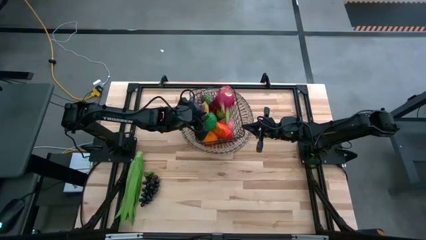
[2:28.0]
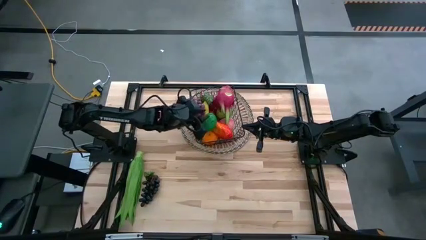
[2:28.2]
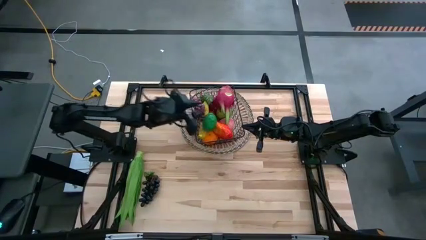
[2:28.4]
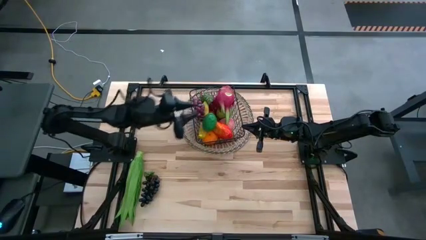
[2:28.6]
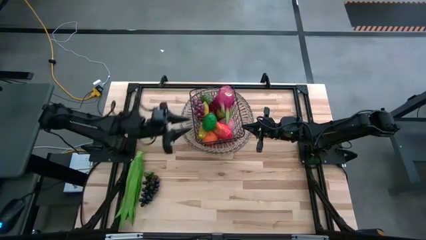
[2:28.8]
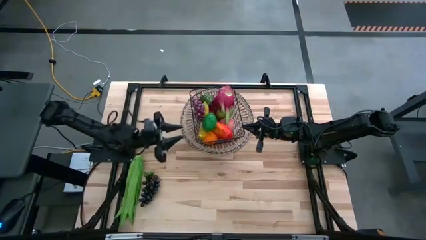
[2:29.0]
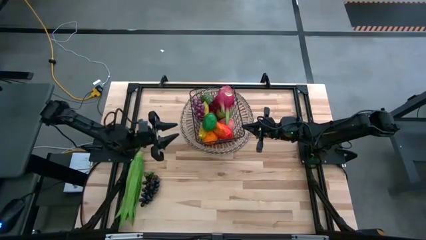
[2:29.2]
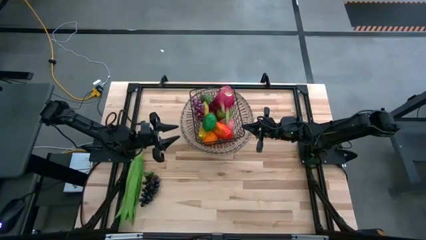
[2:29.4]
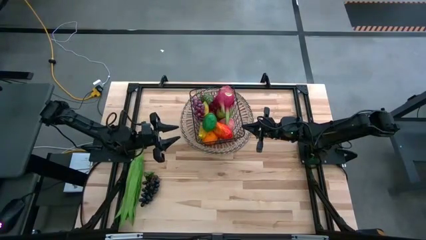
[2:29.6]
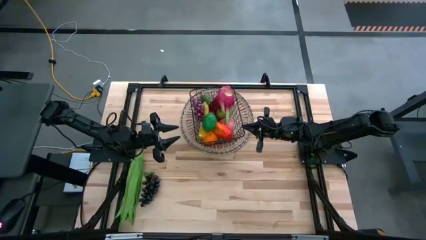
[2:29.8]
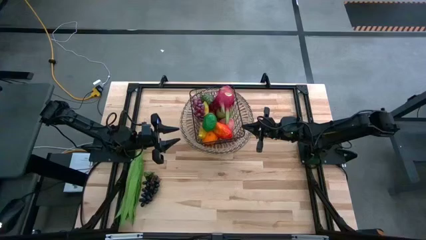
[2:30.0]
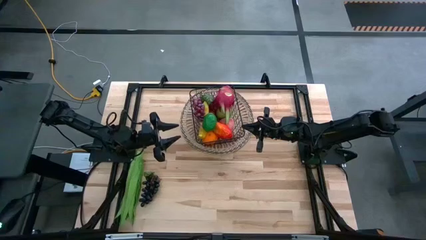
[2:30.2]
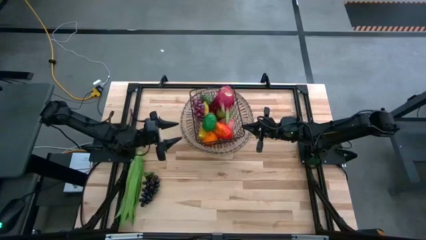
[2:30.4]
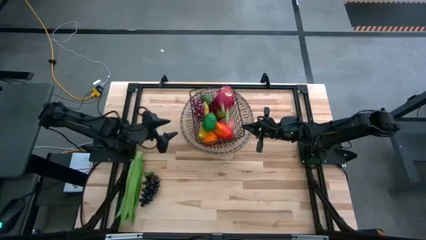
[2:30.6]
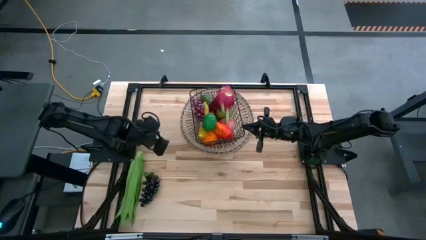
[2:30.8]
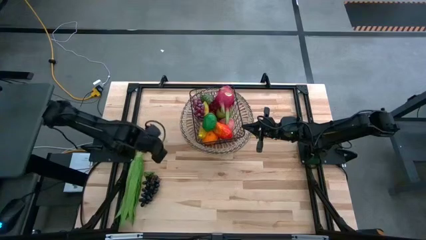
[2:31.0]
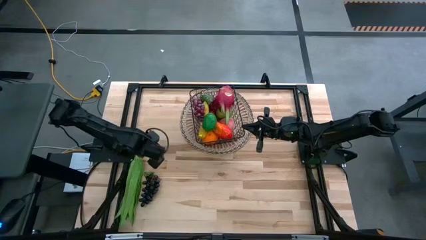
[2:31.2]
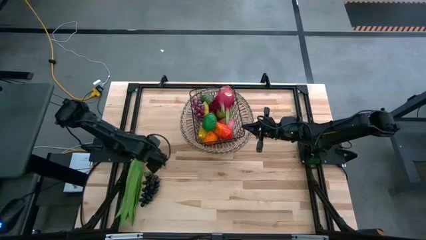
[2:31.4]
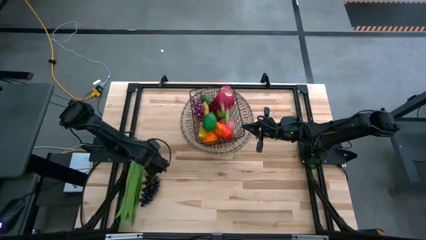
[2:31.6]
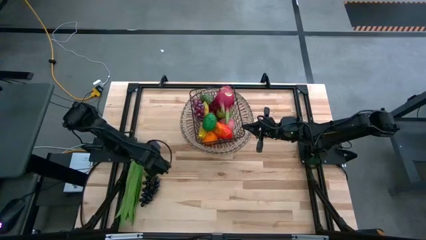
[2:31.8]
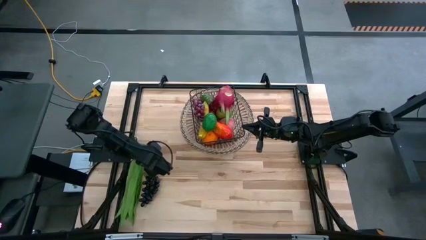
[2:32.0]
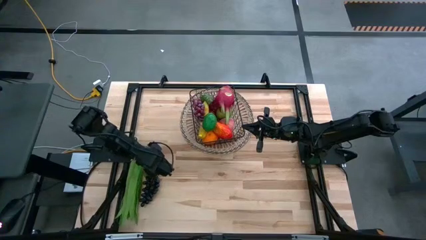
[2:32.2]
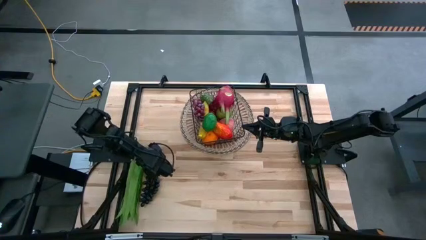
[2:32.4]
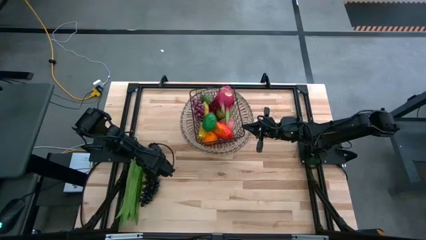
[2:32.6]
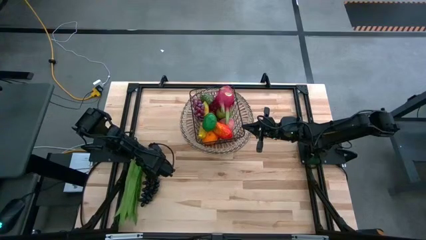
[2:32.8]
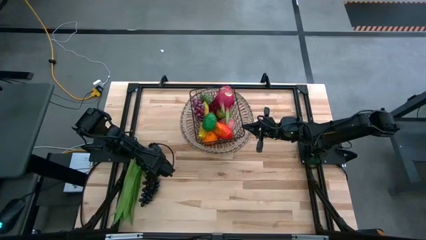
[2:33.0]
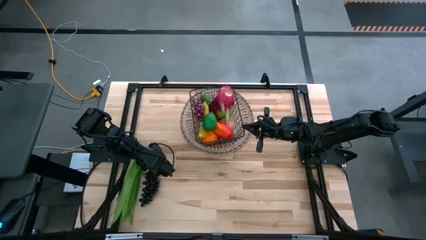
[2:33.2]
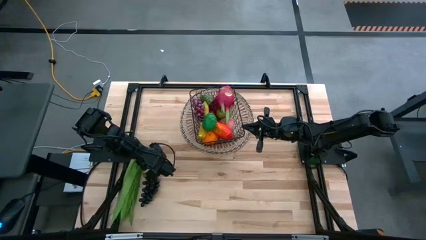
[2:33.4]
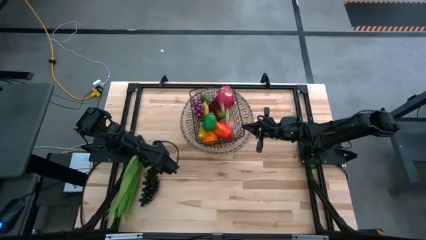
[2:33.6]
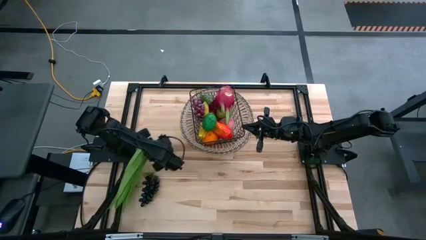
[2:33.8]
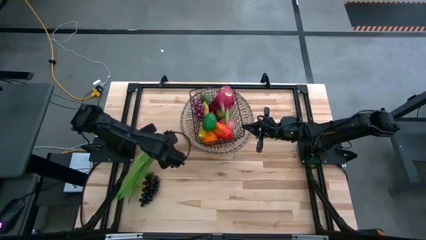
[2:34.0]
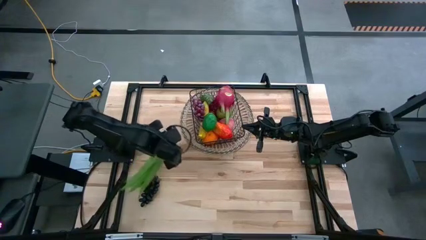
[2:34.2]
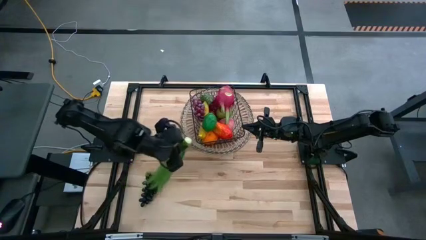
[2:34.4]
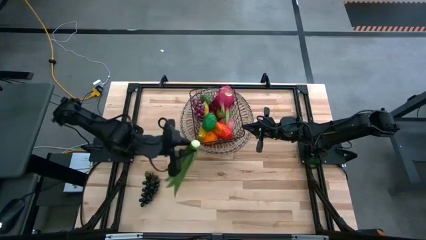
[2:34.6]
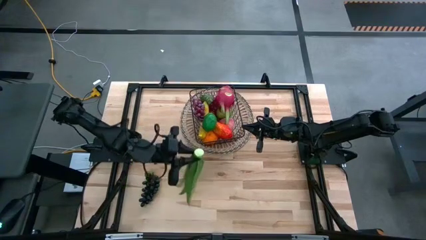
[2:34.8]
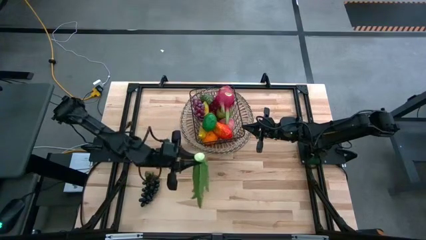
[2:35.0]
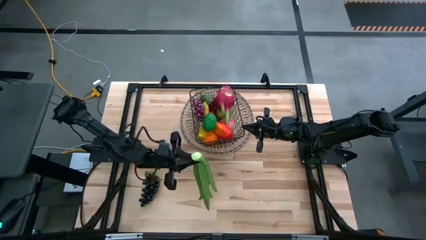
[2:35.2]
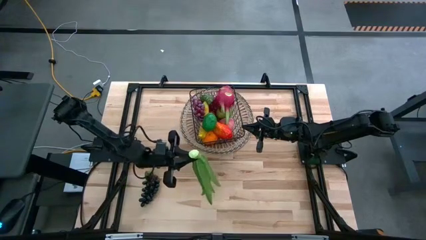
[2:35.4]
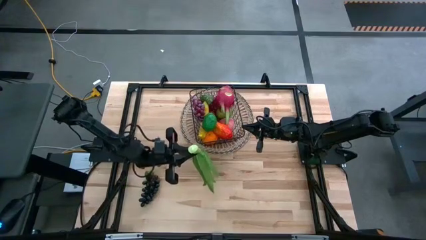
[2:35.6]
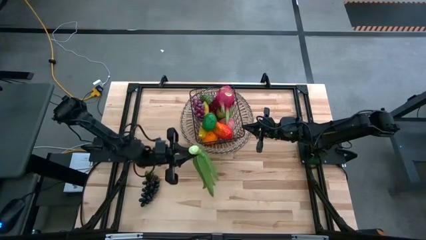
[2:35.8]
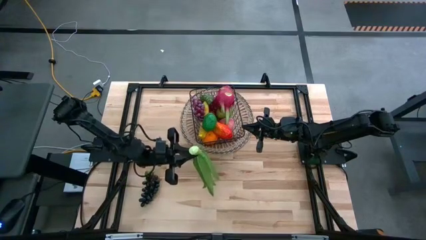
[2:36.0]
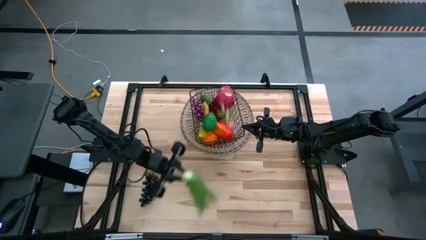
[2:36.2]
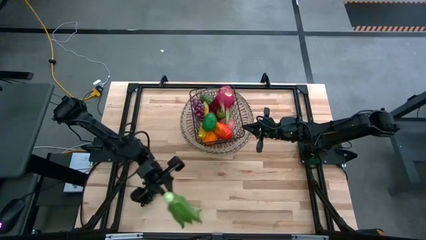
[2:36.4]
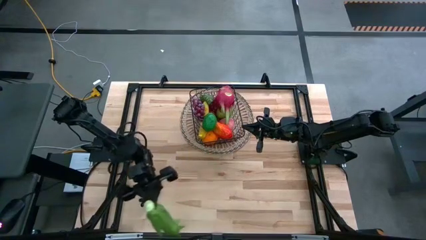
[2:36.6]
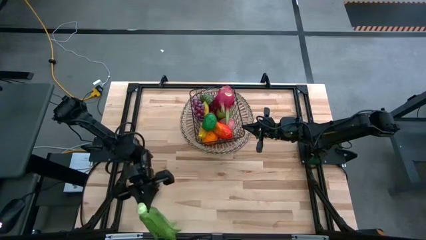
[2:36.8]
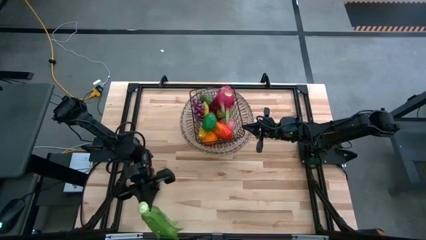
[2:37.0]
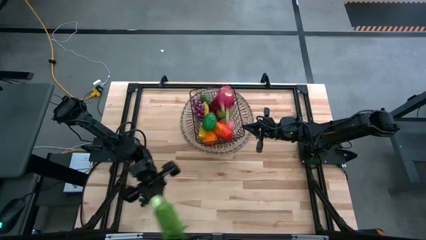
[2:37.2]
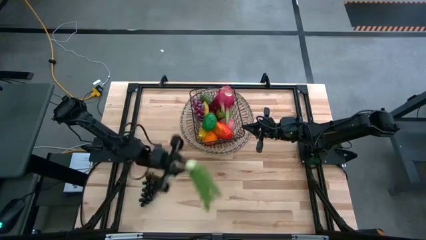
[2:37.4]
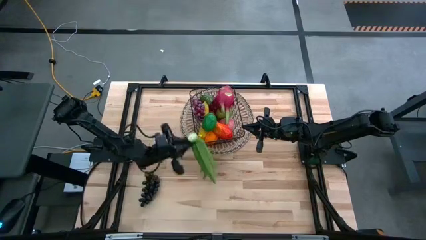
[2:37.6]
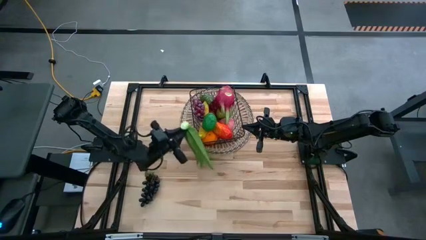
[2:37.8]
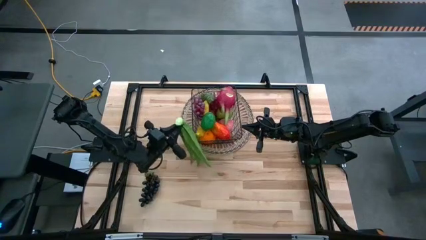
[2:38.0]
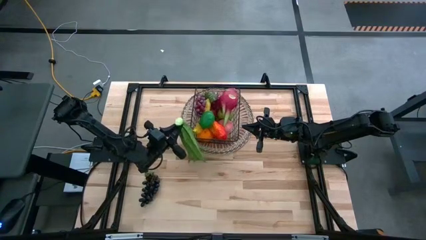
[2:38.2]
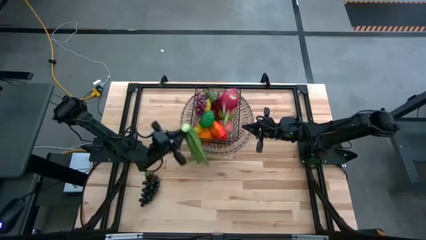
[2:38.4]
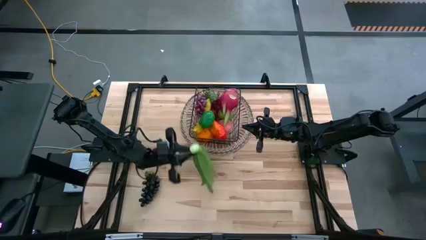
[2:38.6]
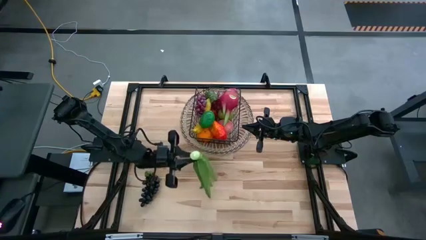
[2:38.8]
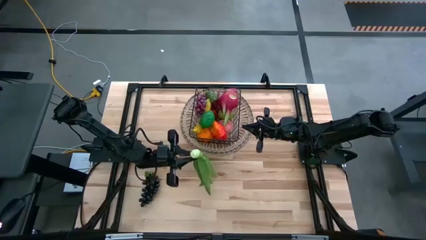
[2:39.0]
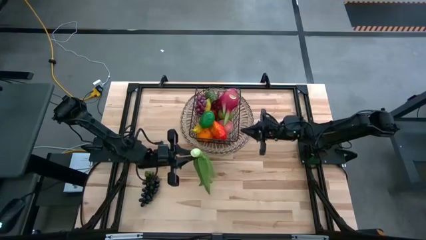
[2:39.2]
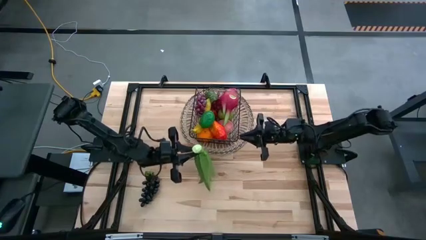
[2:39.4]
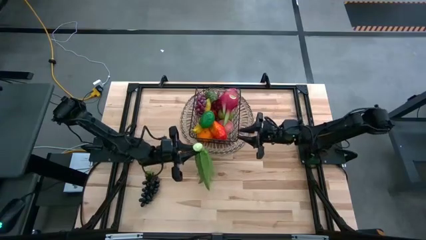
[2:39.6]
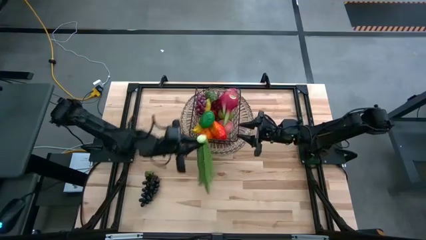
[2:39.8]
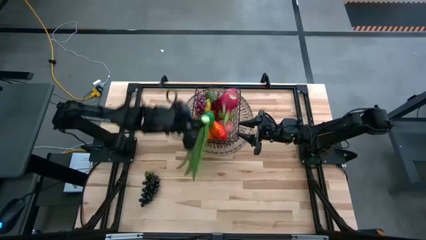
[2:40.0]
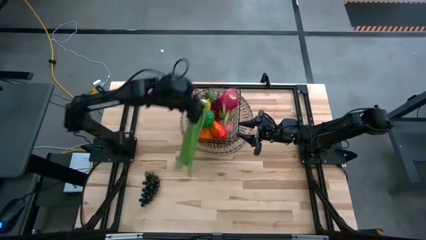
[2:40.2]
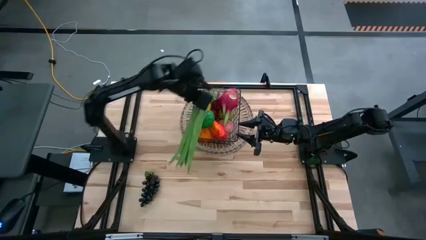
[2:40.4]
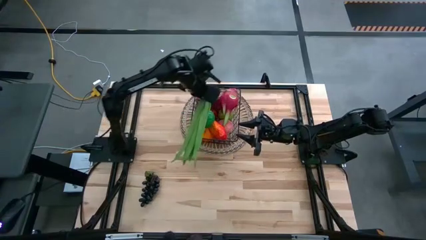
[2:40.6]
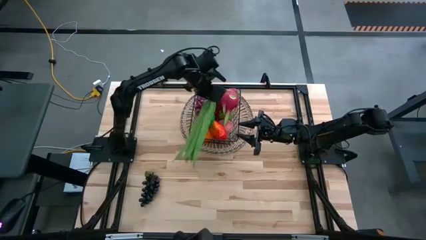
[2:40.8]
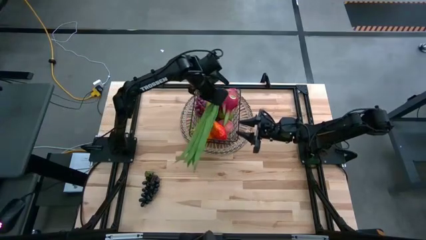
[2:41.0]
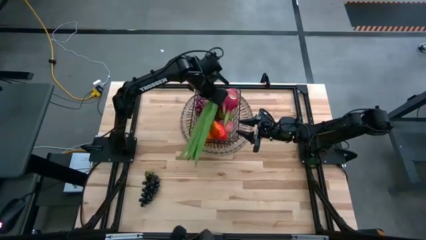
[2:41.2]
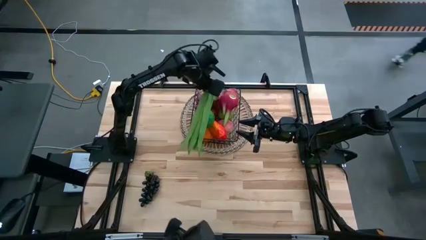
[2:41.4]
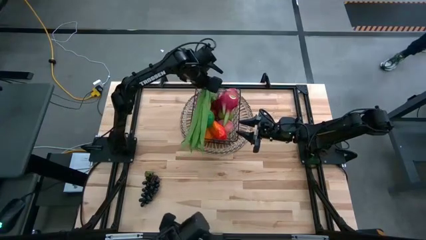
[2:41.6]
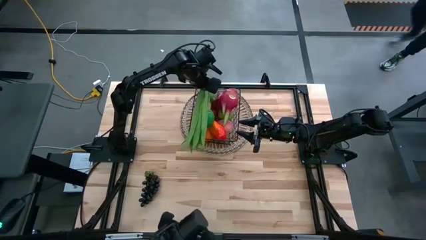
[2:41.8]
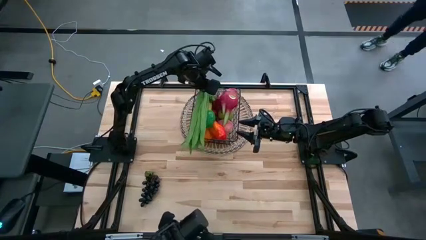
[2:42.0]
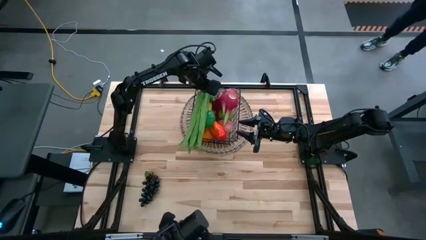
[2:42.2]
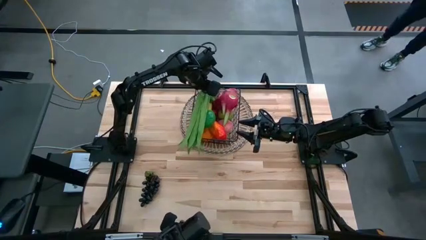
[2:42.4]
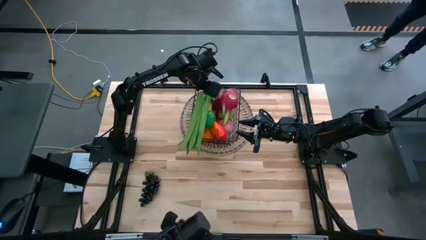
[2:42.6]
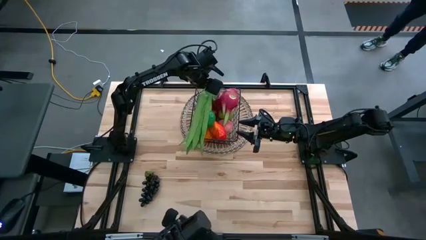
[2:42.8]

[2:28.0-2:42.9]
Task: Build produce basket
Put the corn into the black wire basket
